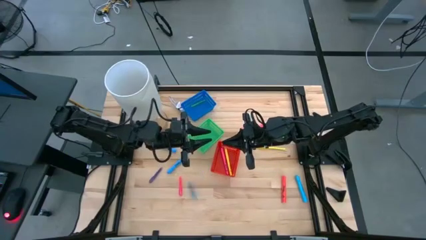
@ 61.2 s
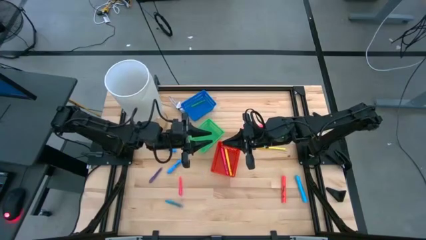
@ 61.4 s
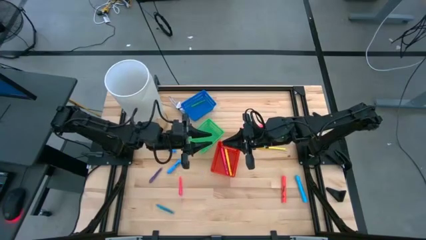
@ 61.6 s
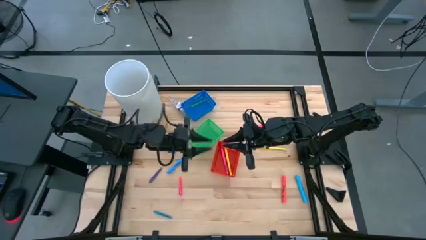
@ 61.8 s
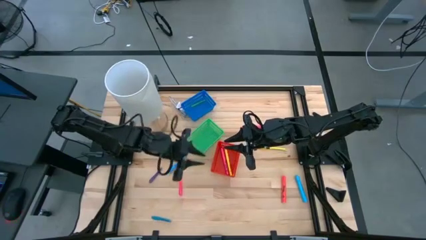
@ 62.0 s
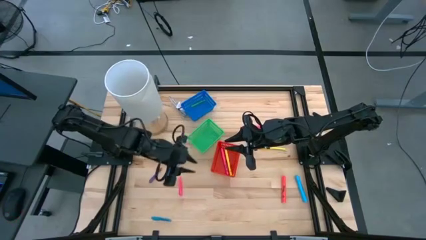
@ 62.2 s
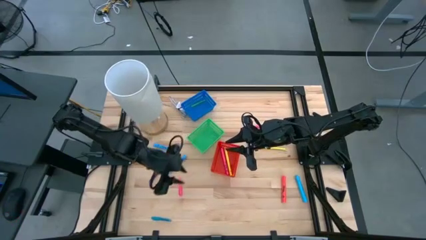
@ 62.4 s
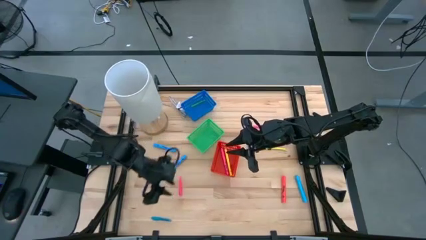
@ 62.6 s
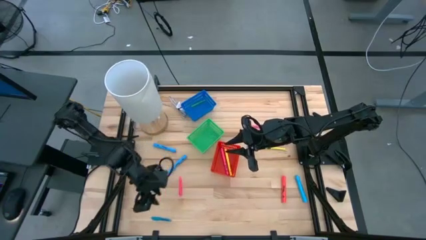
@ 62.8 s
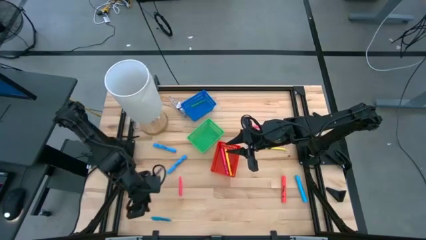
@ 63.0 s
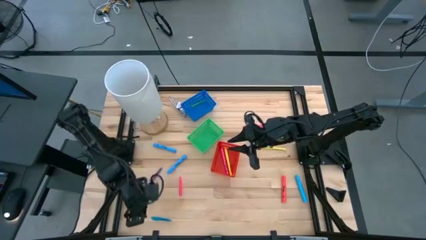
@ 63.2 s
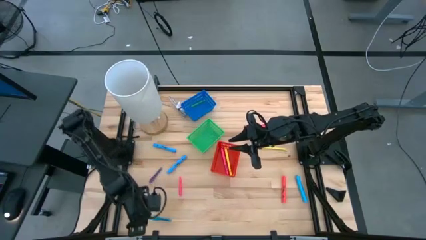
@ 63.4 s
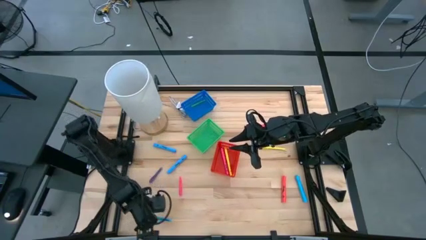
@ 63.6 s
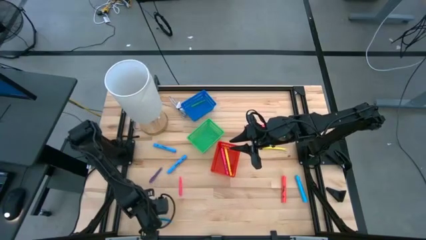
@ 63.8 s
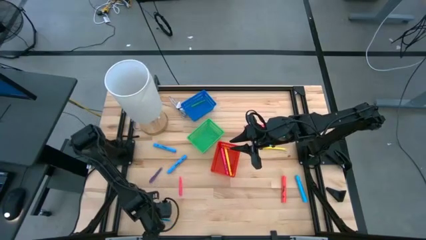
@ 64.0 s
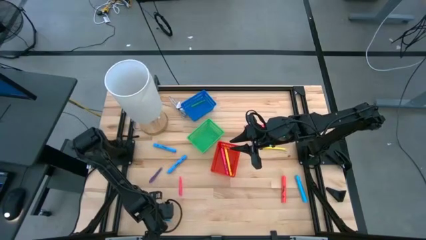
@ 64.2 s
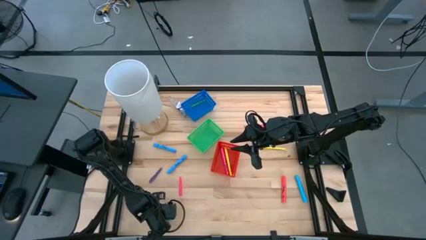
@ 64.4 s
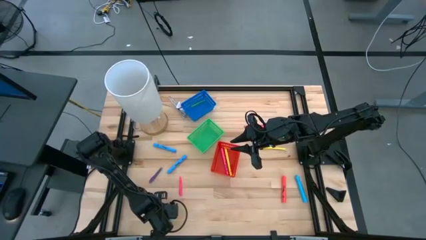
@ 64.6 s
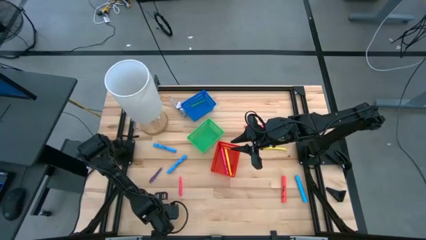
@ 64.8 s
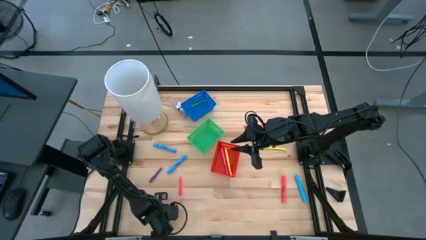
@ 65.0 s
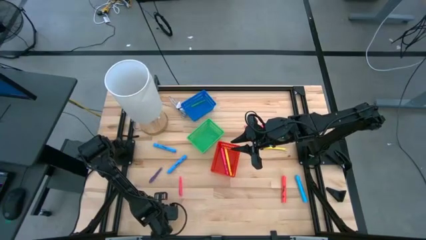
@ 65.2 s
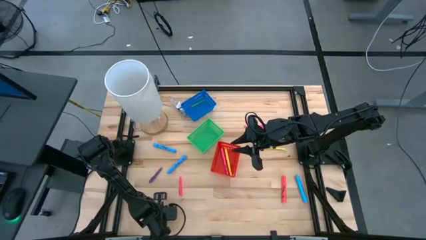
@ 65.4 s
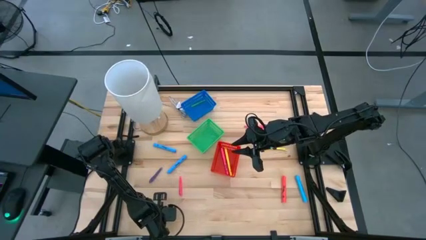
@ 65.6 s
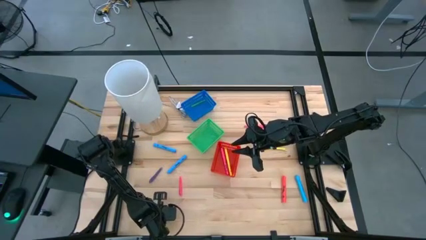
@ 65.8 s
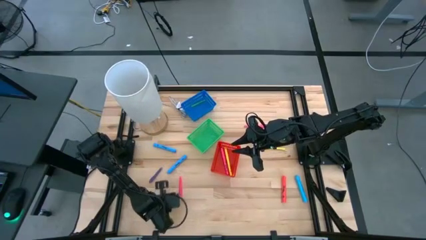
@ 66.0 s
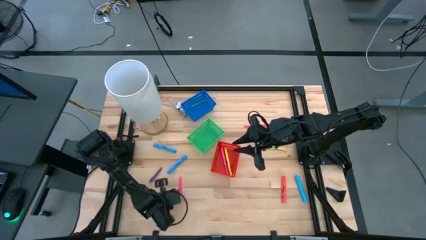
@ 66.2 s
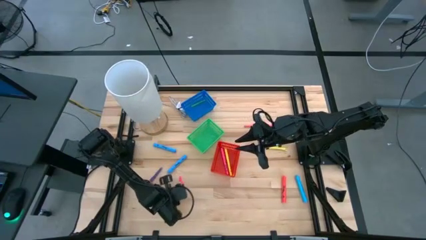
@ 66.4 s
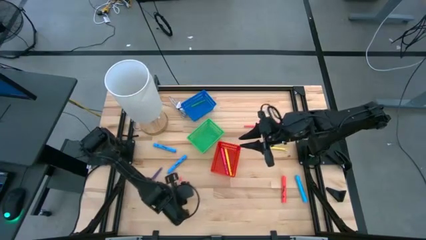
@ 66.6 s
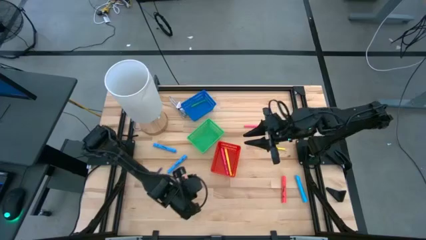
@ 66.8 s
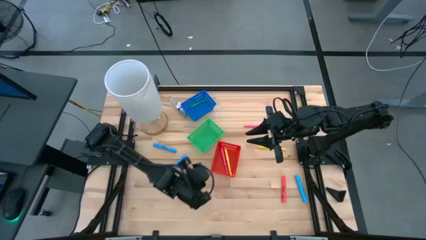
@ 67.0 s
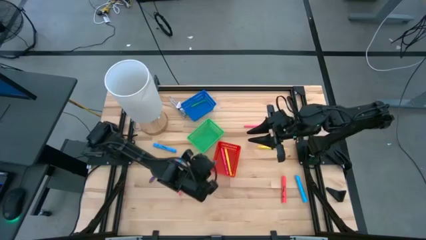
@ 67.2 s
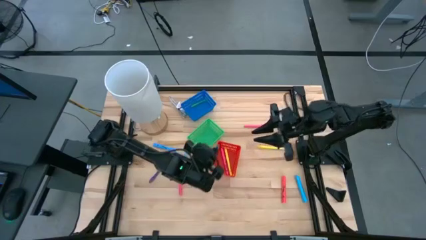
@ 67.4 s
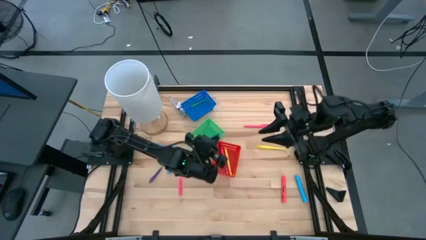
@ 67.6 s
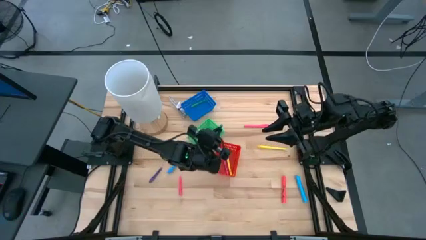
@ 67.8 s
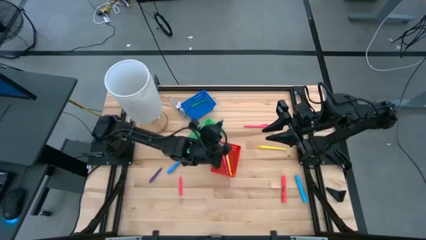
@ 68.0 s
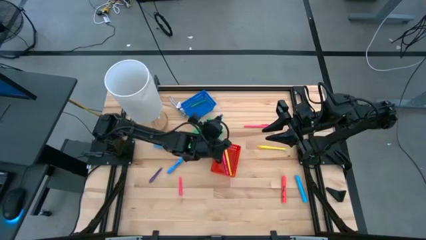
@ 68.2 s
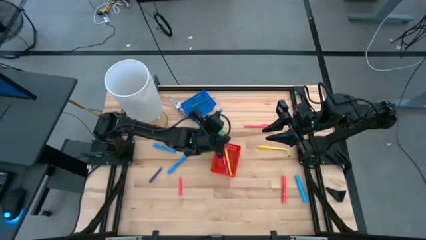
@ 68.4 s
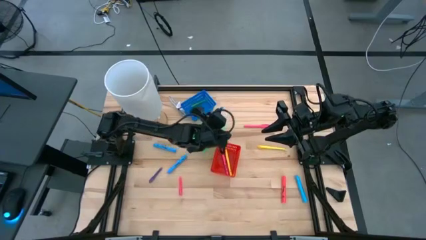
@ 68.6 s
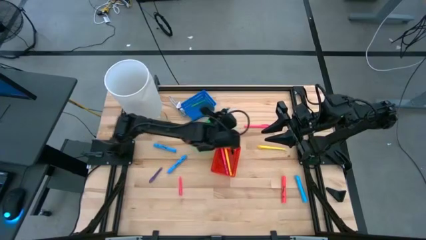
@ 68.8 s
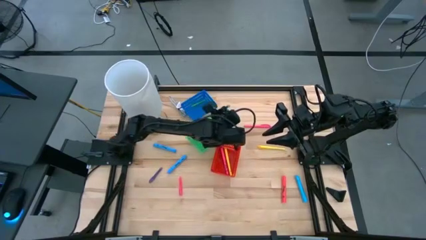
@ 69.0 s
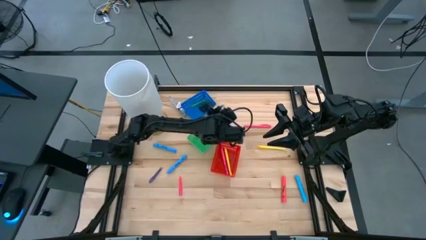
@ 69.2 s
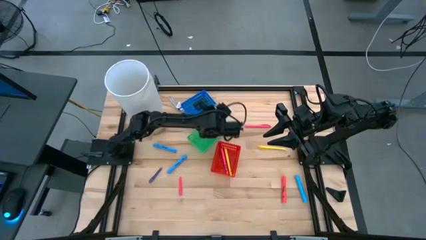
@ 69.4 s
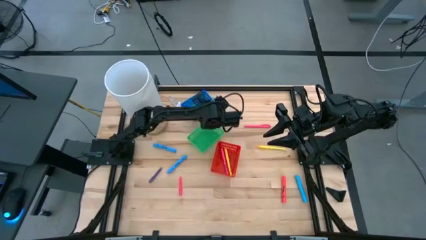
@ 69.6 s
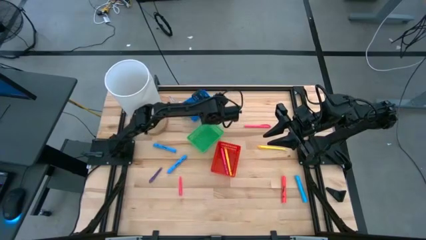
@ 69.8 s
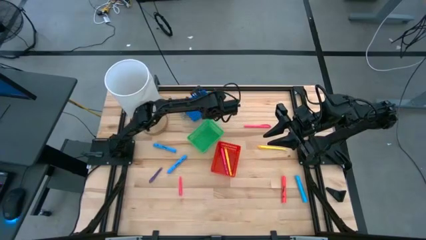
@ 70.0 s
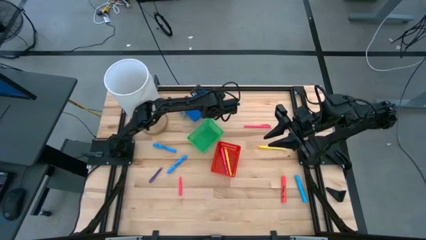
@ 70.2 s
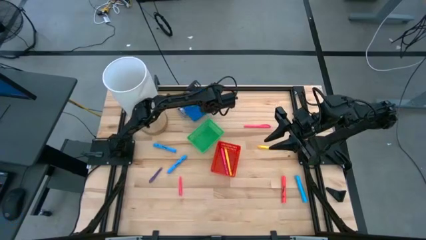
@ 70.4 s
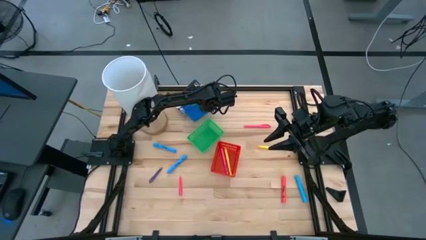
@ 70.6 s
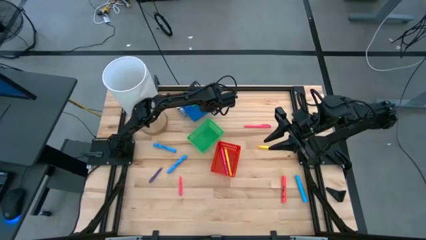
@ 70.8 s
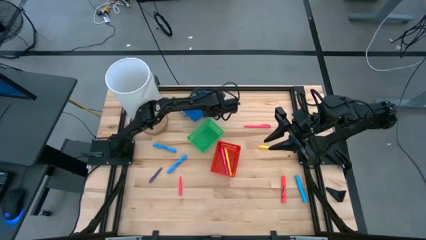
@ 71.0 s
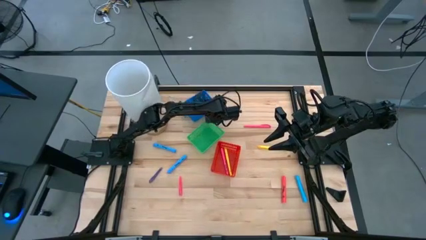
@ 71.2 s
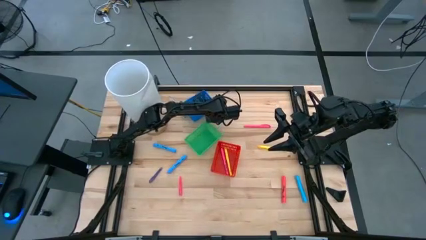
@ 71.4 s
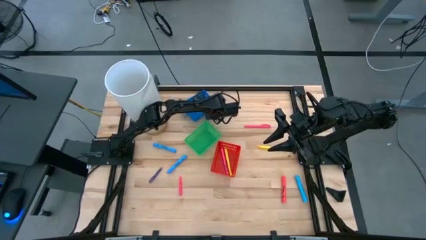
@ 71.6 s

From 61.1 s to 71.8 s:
Task: Pick & Place Markers
Put the small blue pen into the blue bin
